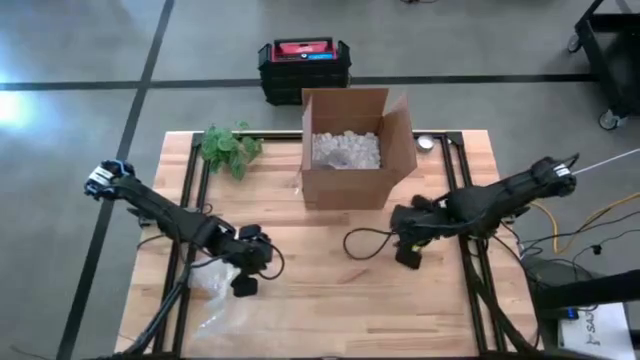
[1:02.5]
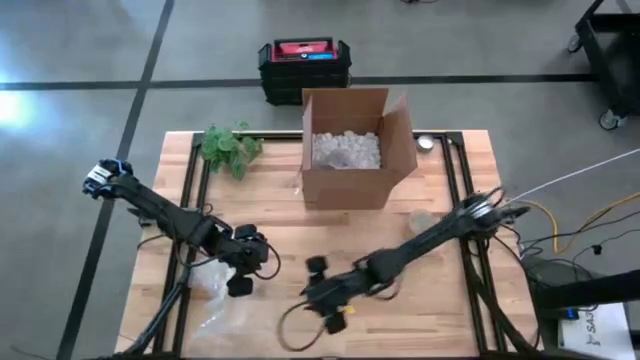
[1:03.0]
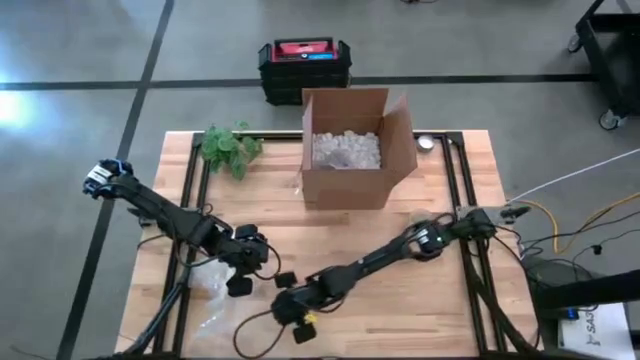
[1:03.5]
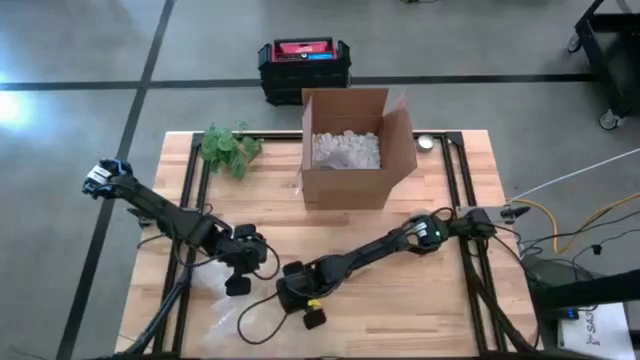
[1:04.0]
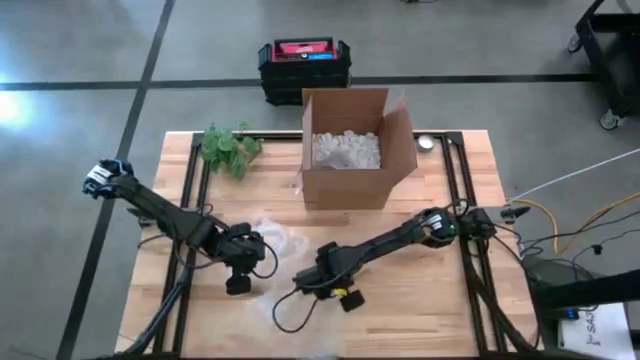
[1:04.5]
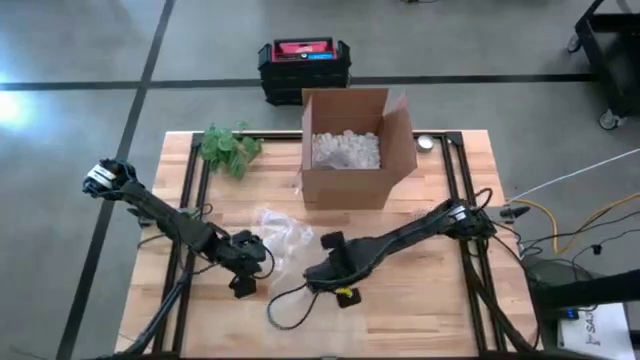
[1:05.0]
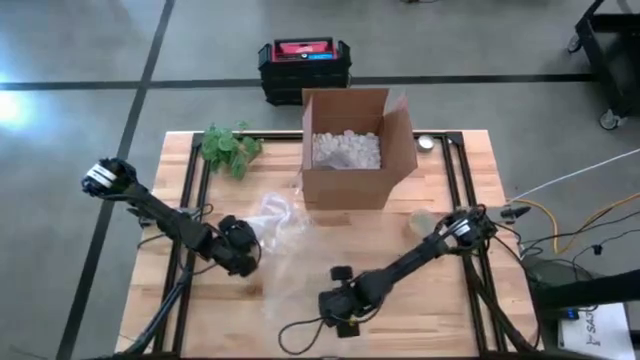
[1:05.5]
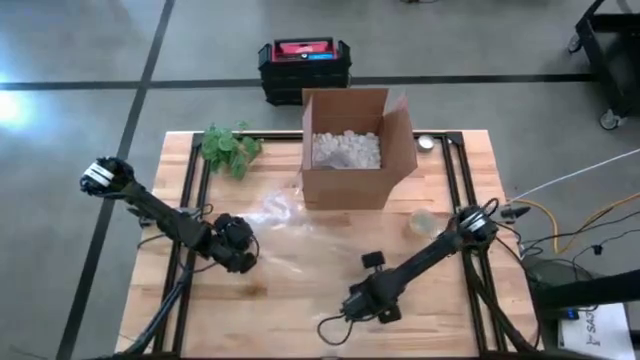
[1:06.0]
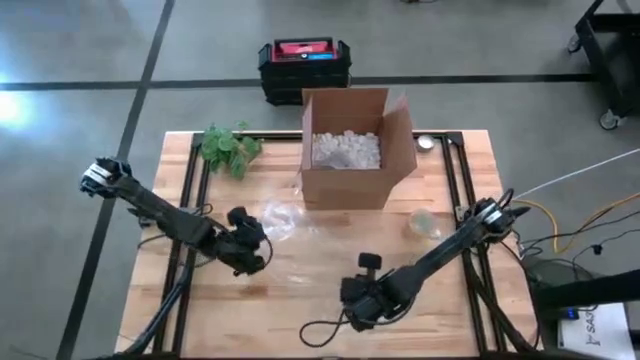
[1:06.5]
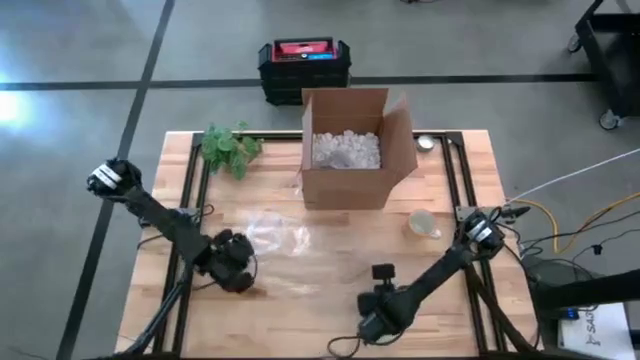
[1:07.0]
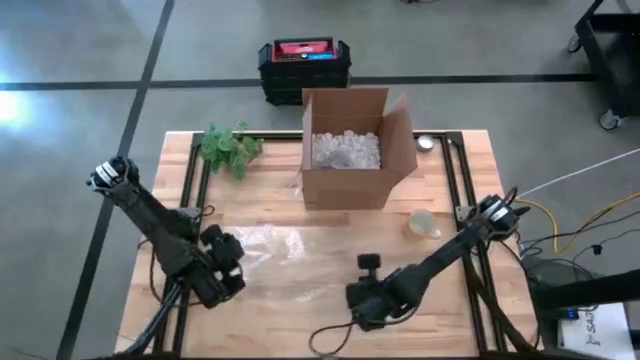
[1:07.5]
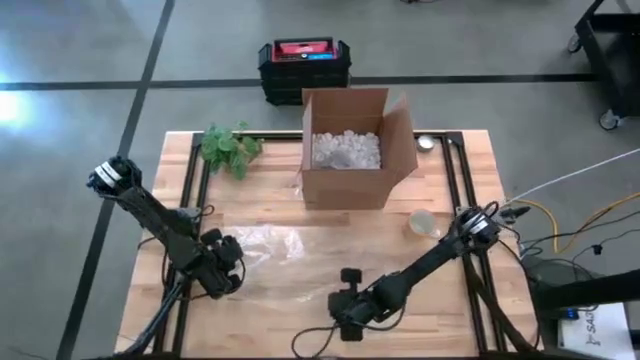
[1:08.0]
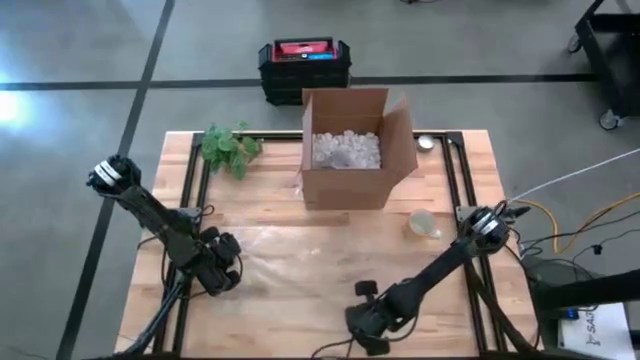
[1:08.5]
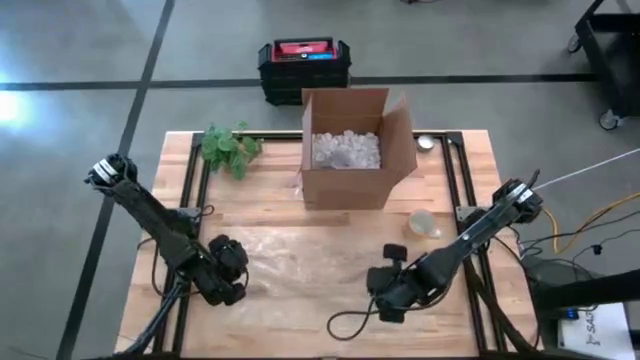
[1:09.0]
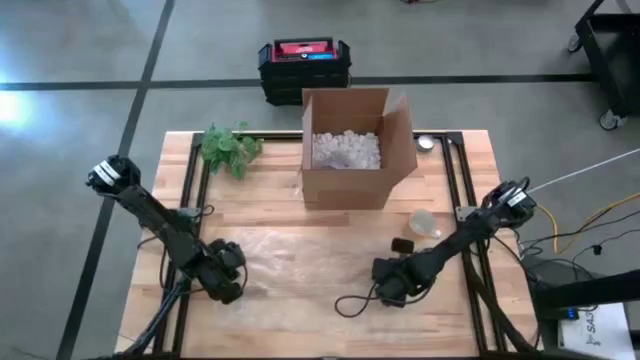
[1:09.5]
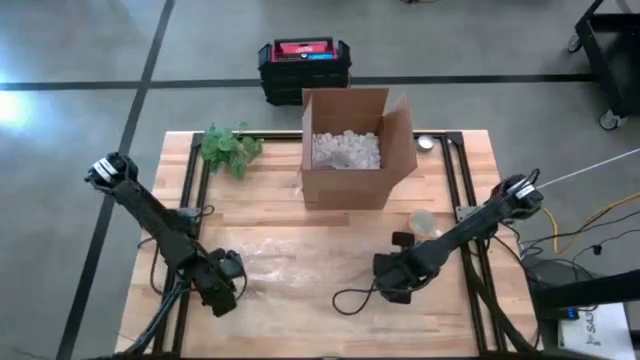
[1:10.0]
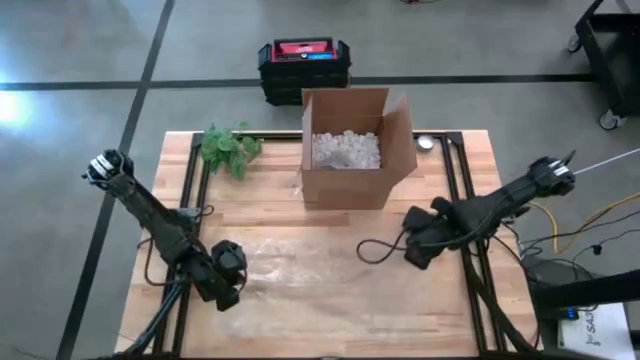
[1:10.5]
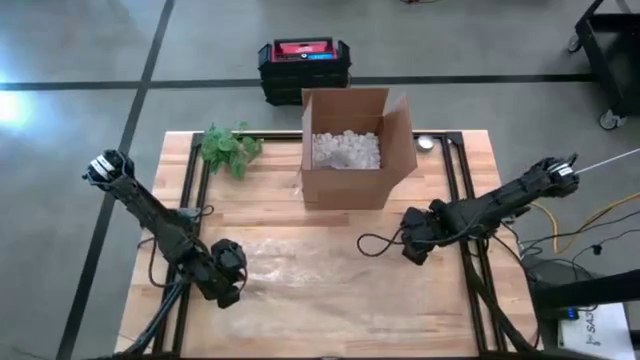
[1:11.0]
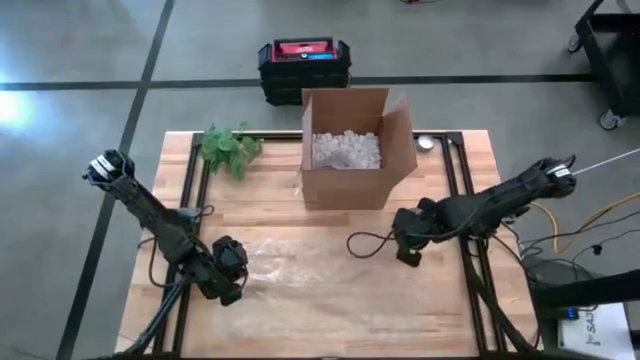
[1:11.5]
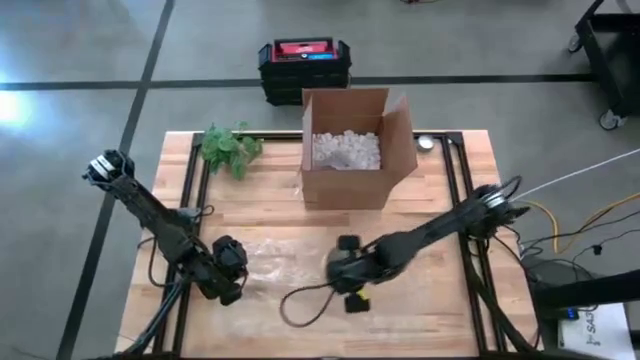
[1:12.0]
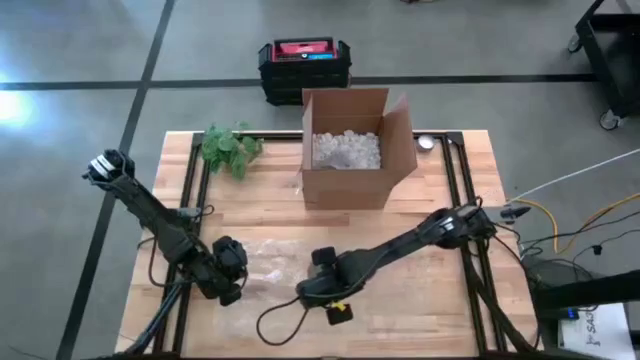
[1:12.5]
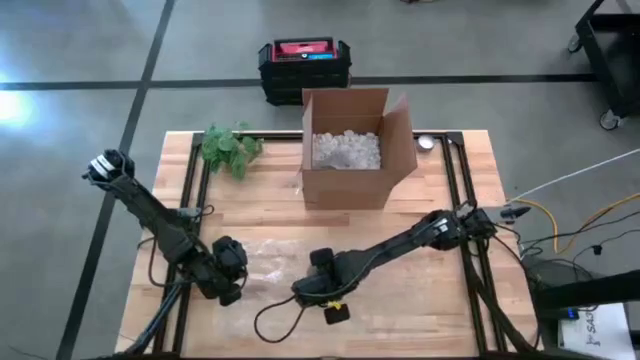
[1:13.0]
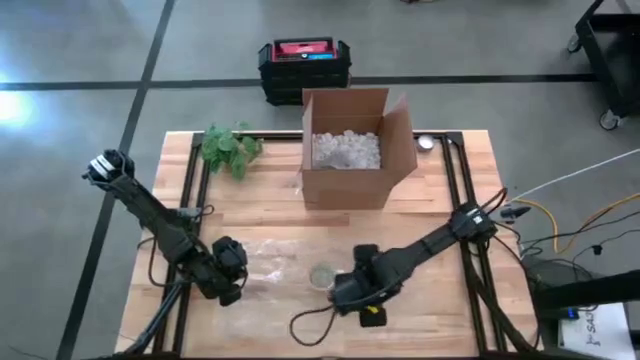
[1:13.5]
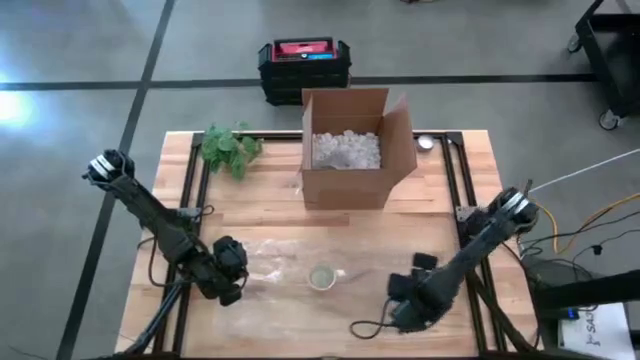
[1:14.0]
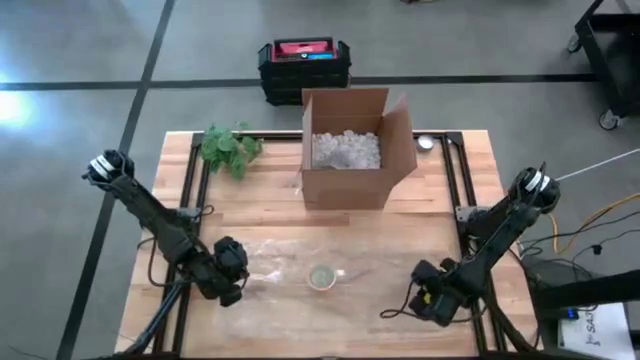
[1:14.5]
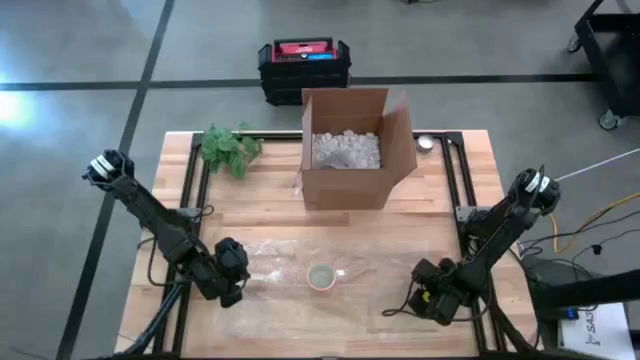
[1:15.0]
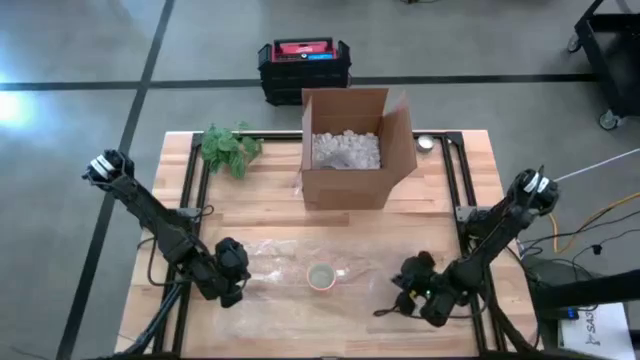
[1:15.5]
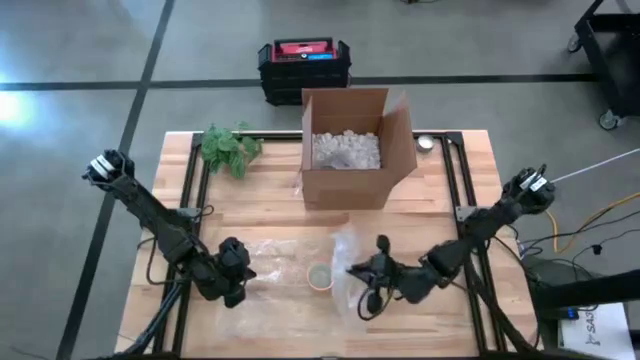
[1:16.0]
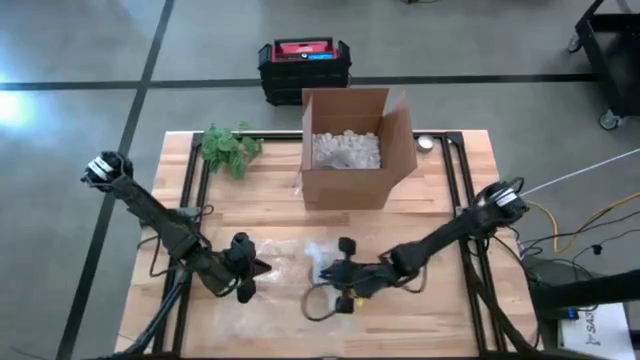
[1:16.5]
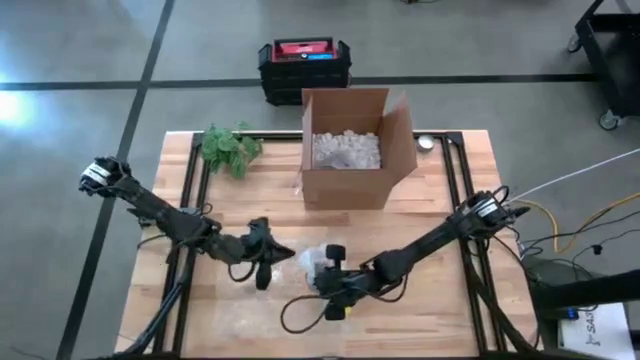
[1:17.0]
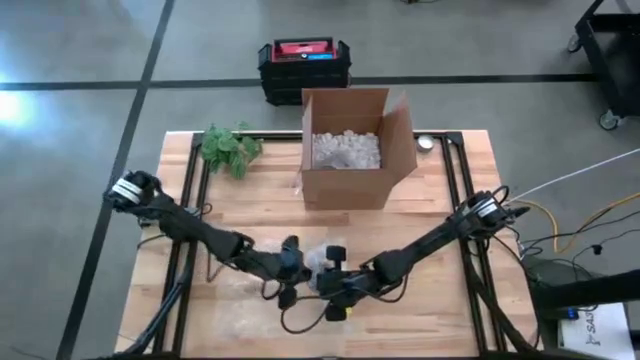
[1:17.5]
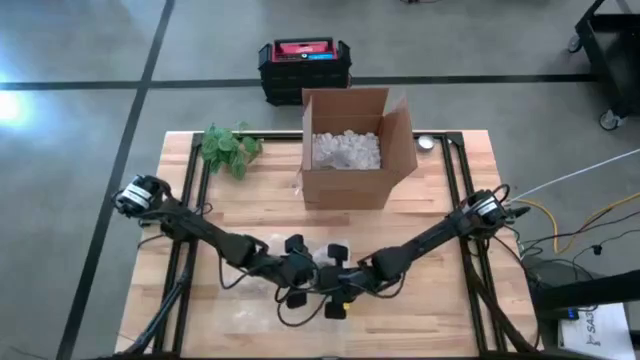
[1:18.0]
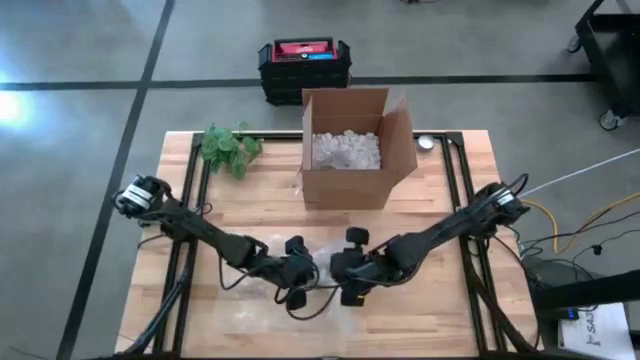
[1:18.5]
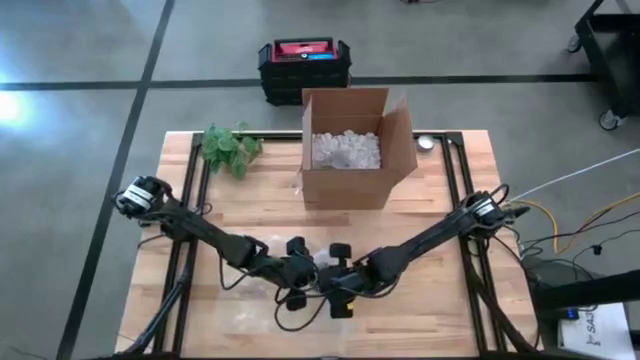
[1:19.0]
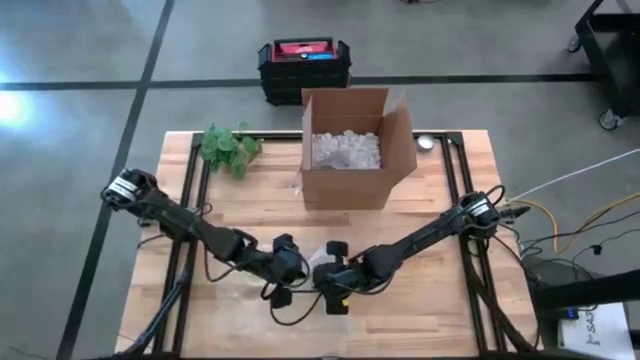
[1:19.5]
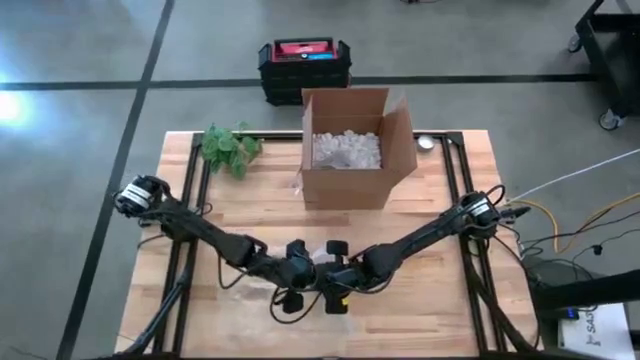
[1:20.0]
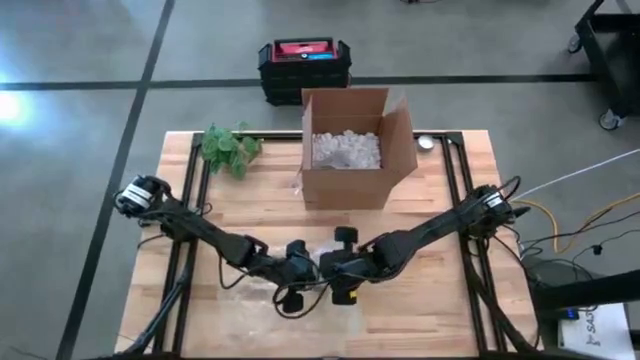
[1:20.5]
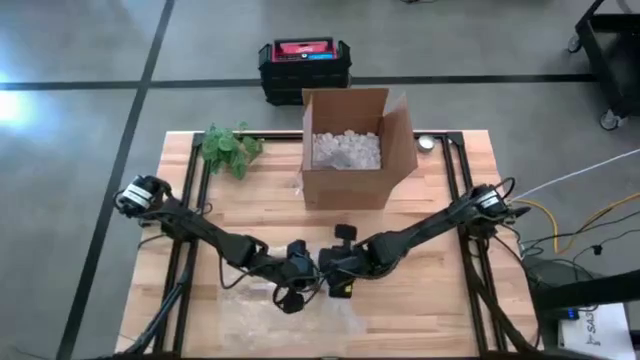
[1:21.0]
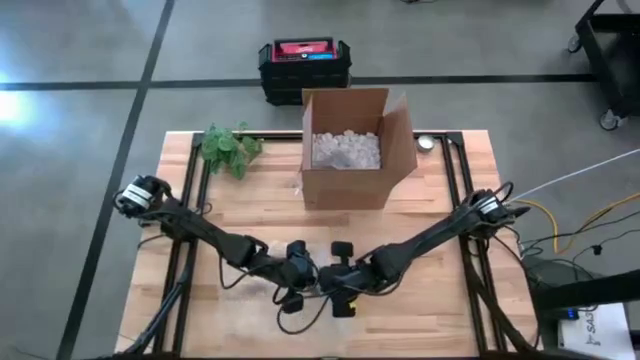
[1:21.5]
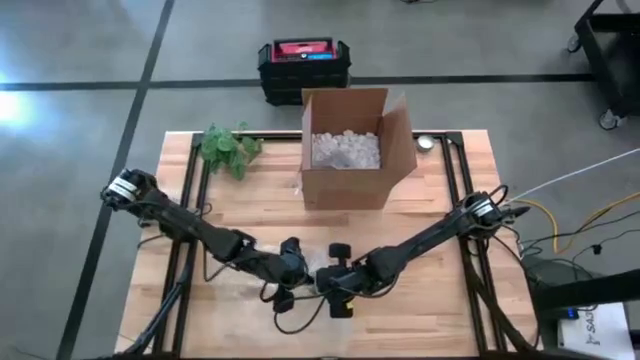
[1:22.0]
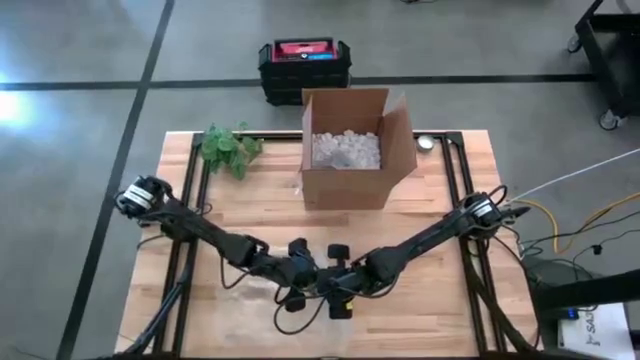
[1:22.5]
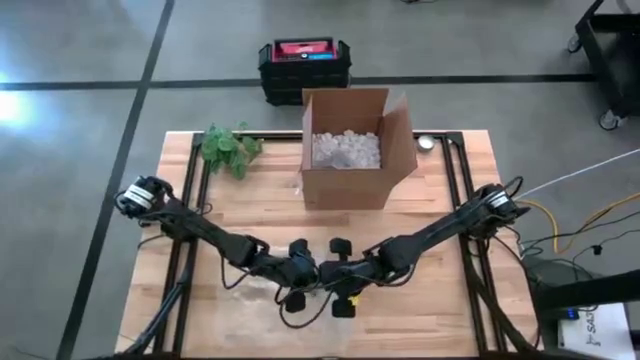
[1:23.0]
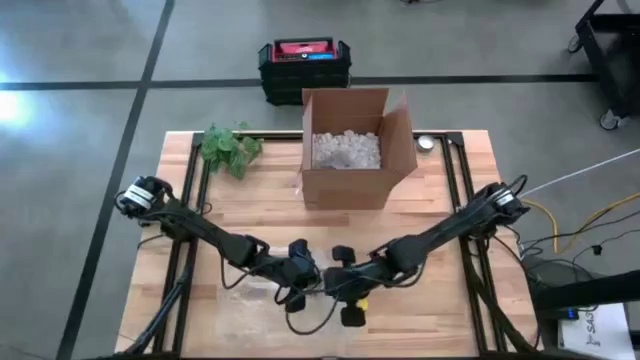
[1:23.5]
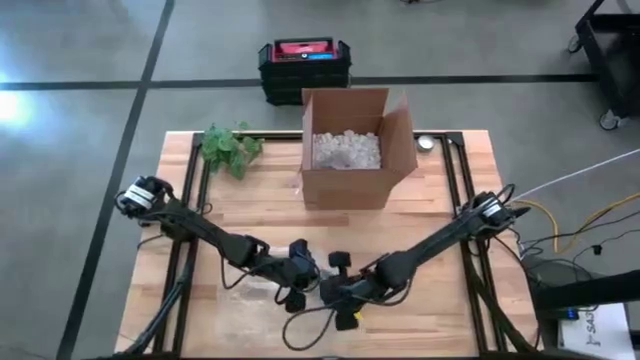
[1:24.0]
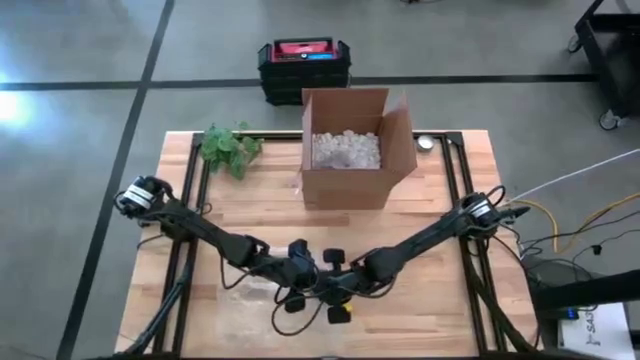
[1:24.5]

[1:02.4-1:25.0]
Task: wrap mug
Wrap the yellow mug with bubble wrap
